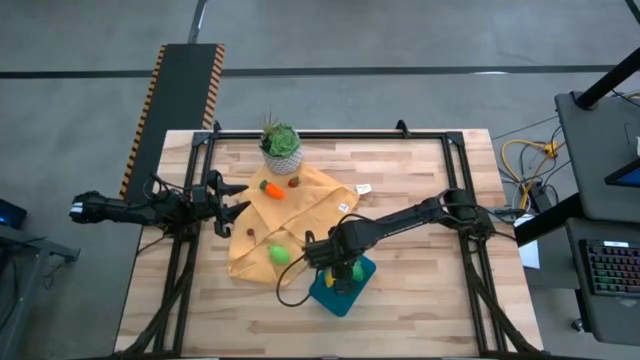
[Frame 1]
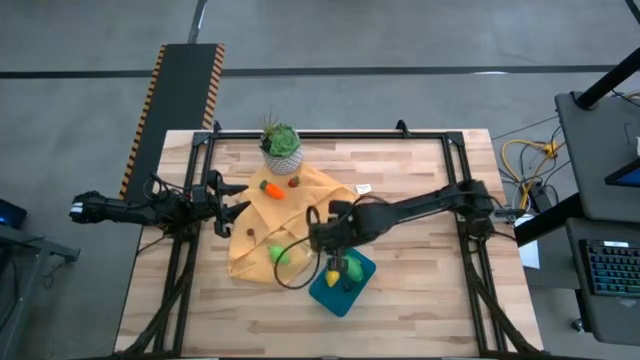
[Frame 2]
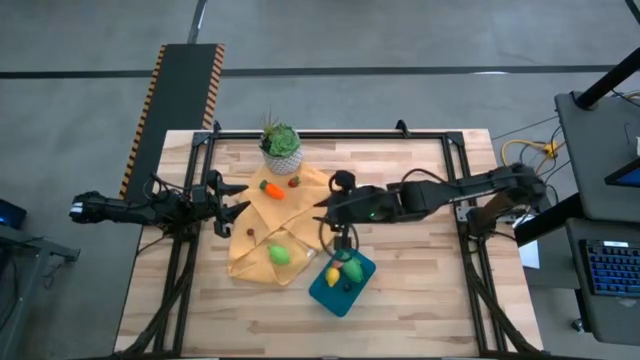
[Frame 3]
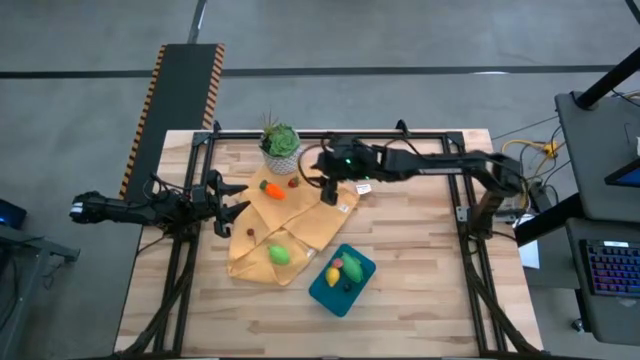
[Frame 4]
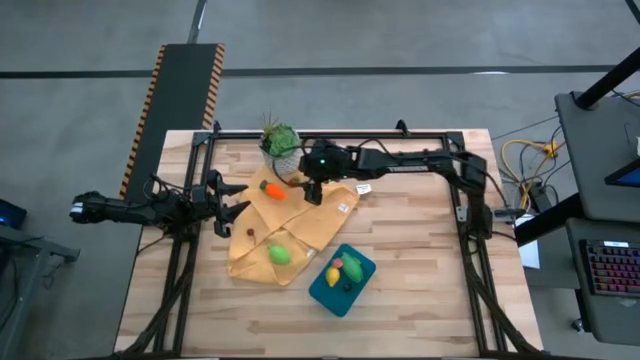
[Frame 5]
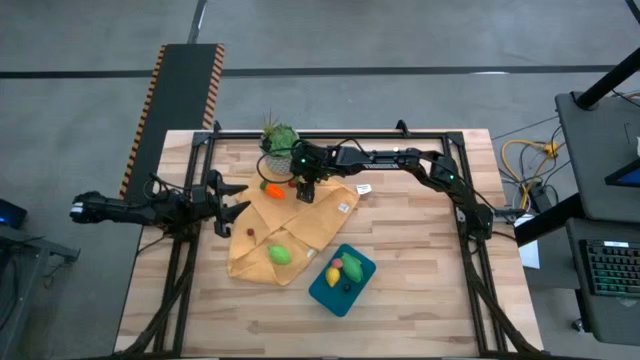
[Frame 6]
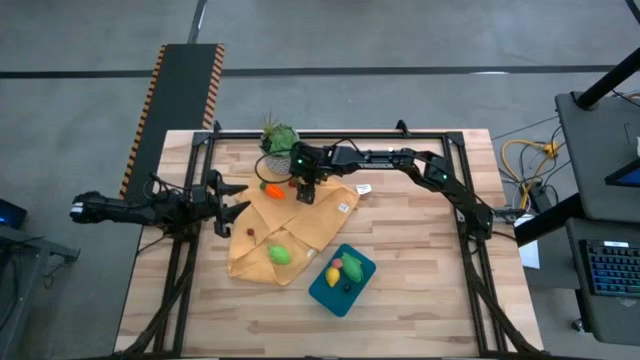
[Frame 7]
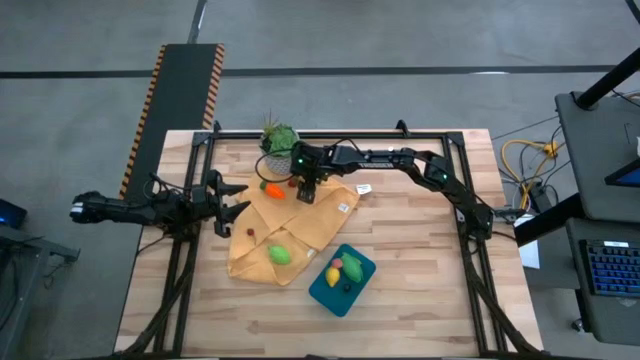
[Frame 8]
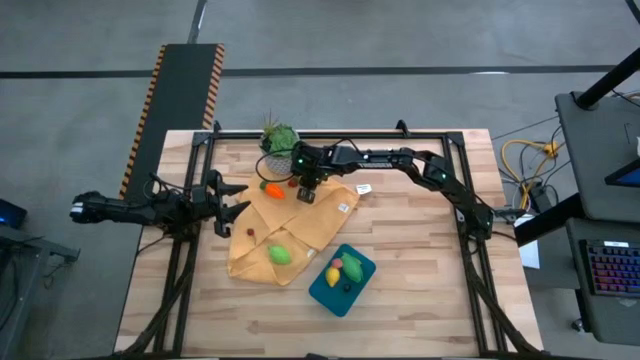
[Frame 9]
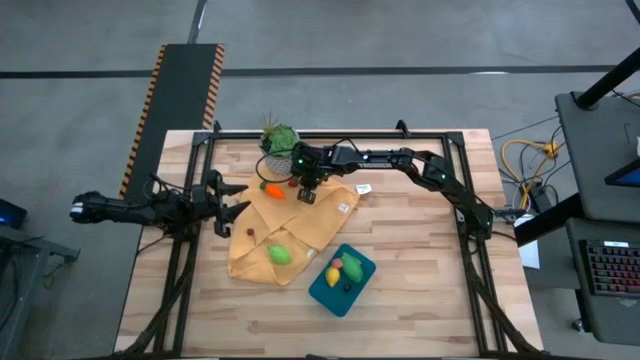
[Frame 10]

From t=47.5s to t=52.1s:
Task: Pick and placing Produce into tupperware
Put the red strawberry into the blue bin

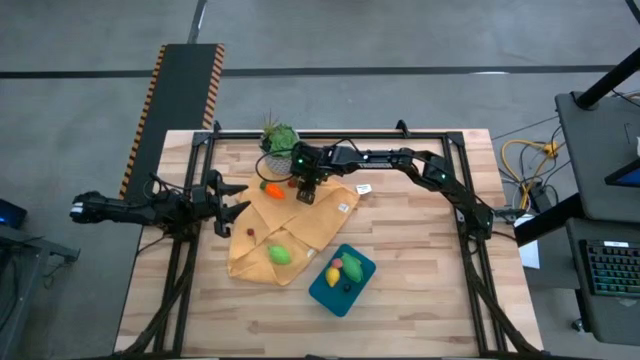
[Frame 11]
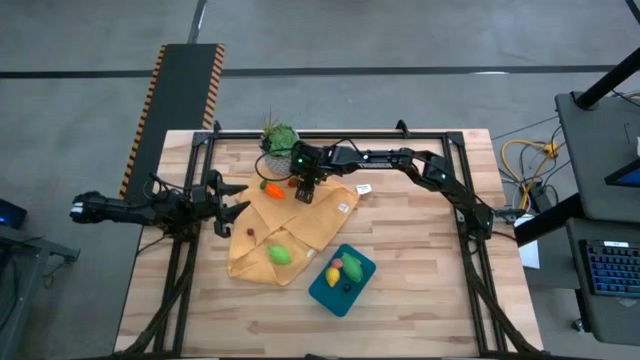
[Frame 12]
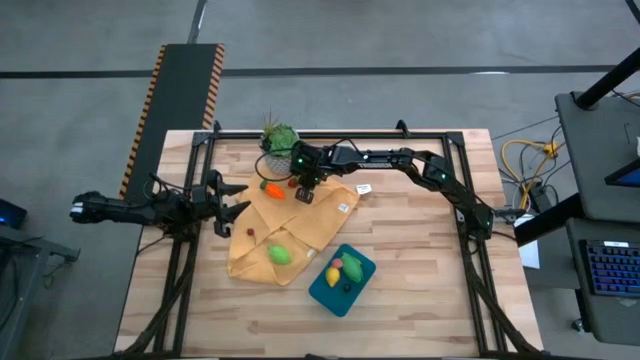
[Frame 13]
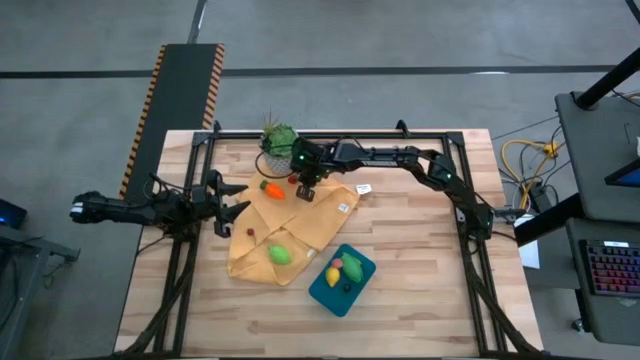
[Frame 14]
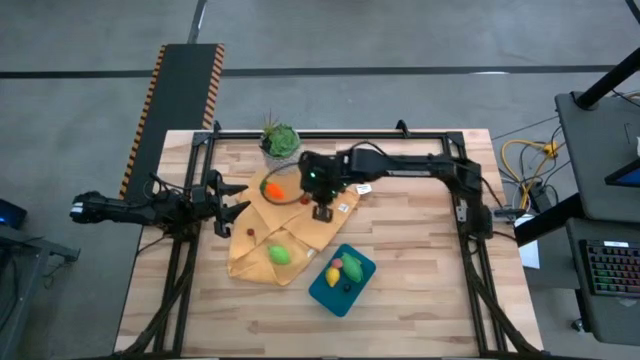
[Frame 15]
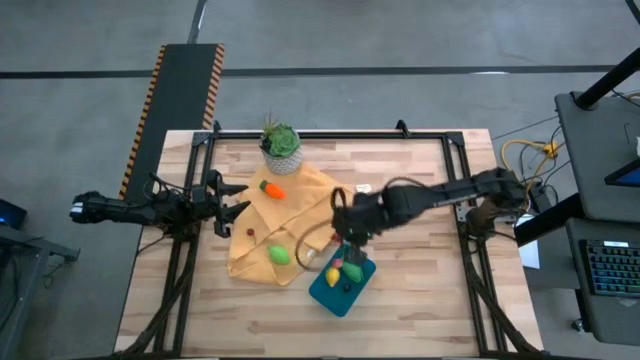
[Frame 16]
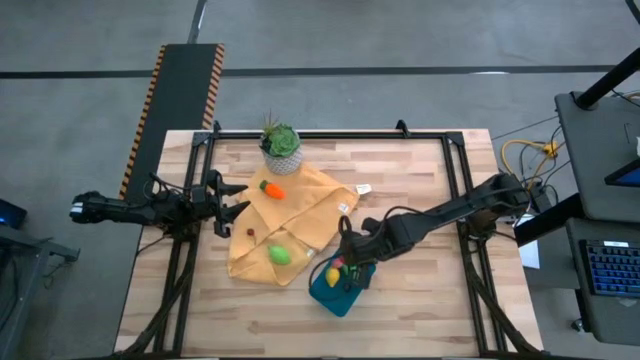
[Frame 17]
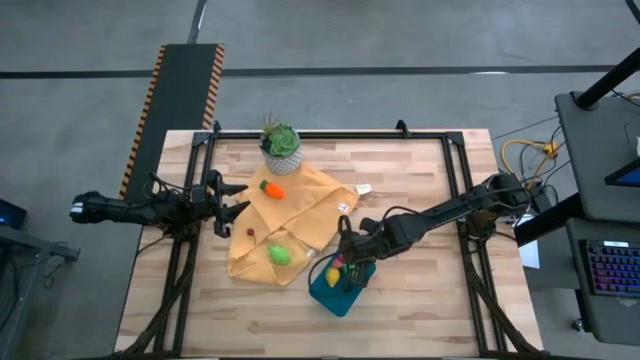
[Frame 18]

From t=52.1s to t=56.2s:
Put the red strawberry into the blue bin

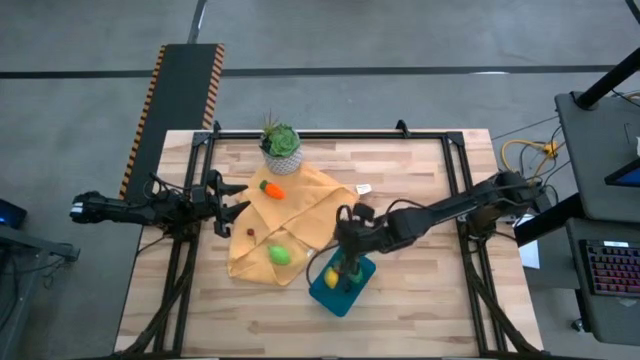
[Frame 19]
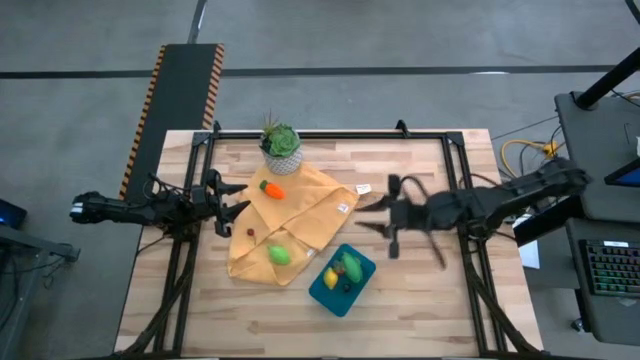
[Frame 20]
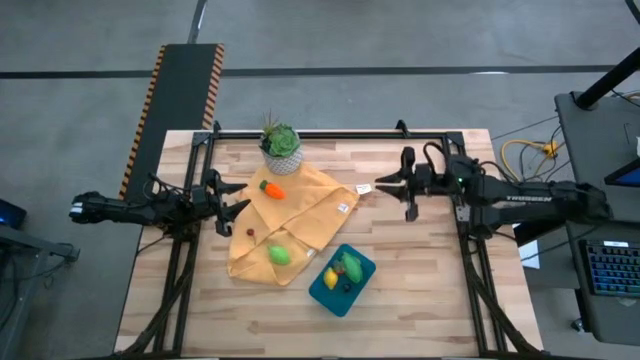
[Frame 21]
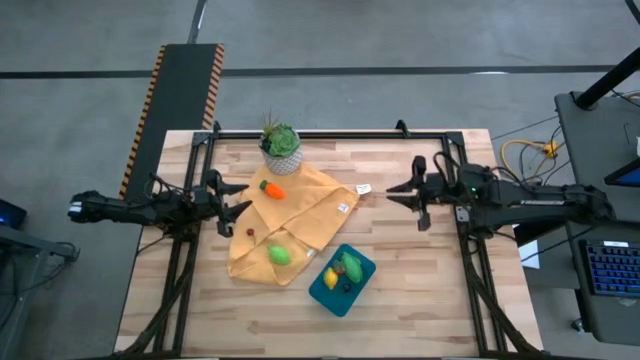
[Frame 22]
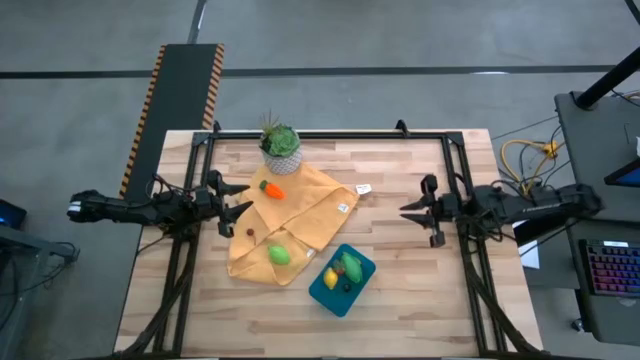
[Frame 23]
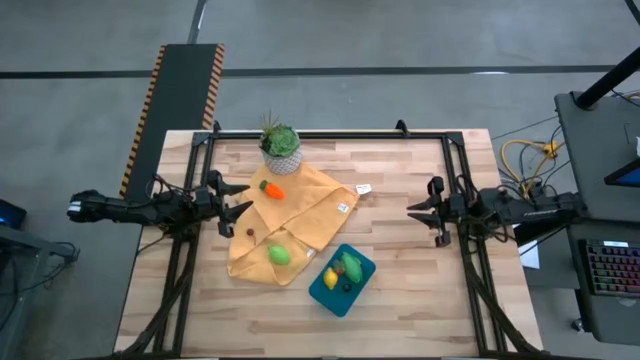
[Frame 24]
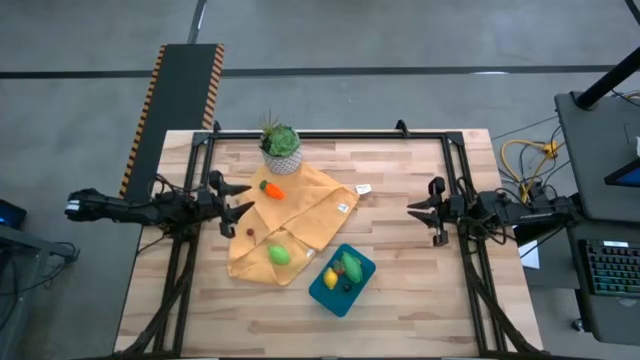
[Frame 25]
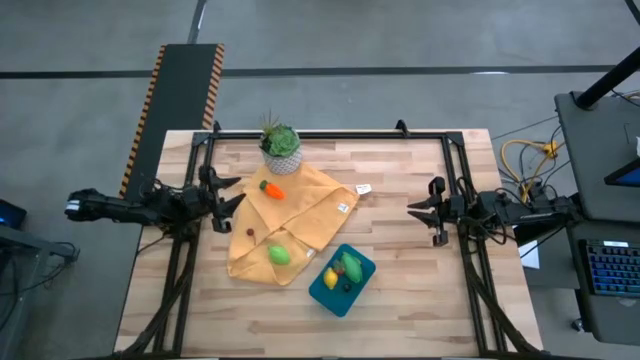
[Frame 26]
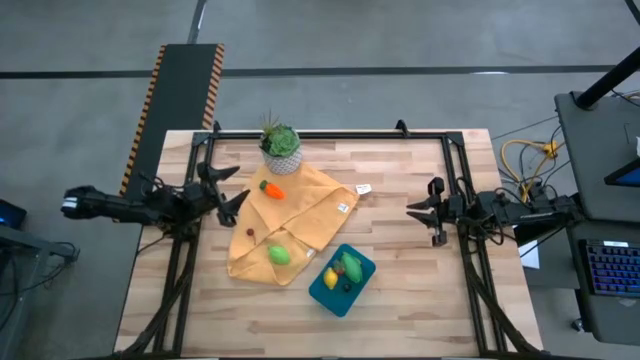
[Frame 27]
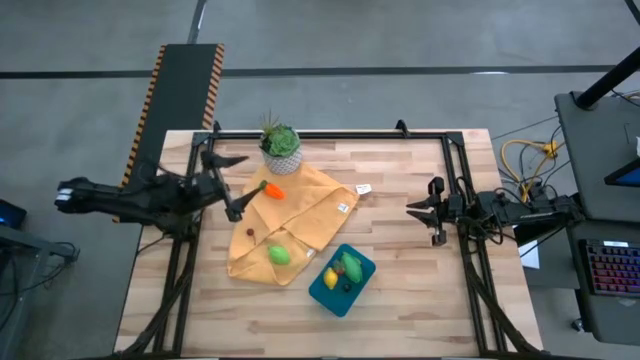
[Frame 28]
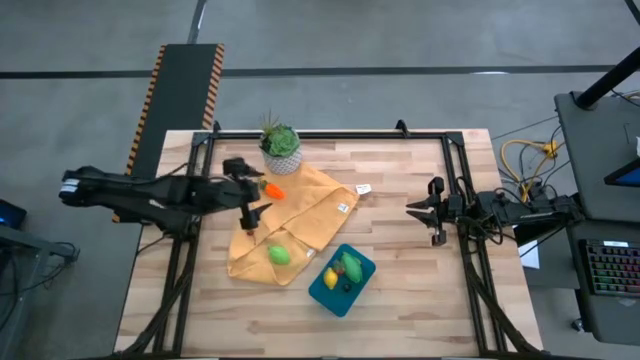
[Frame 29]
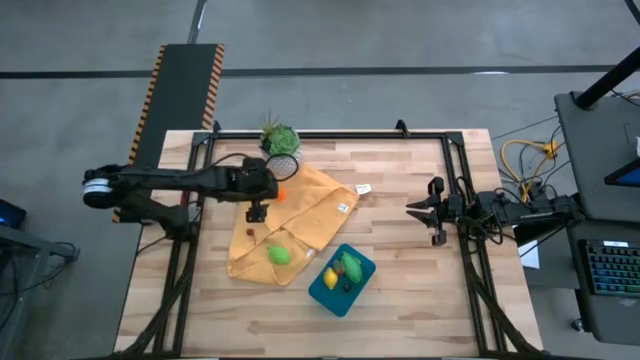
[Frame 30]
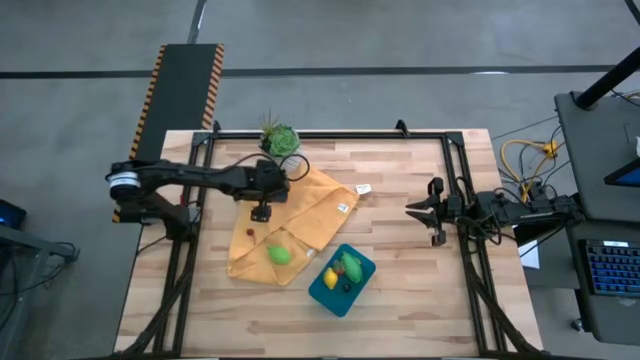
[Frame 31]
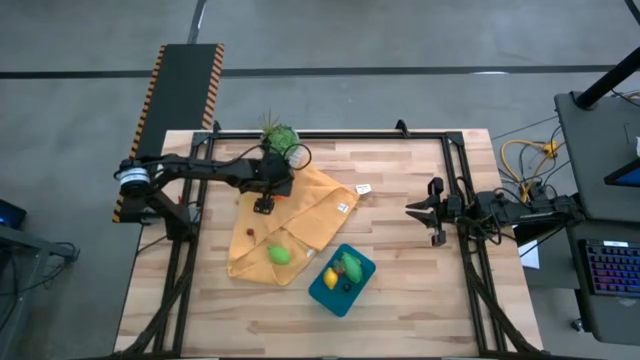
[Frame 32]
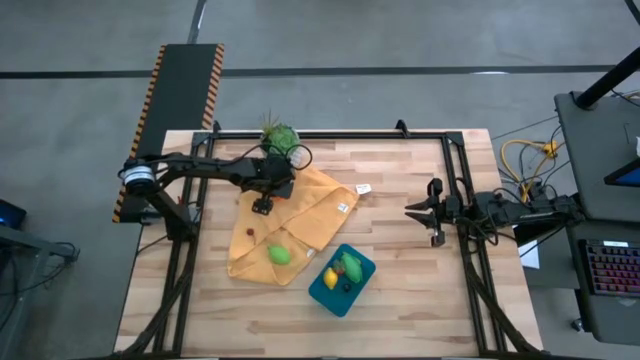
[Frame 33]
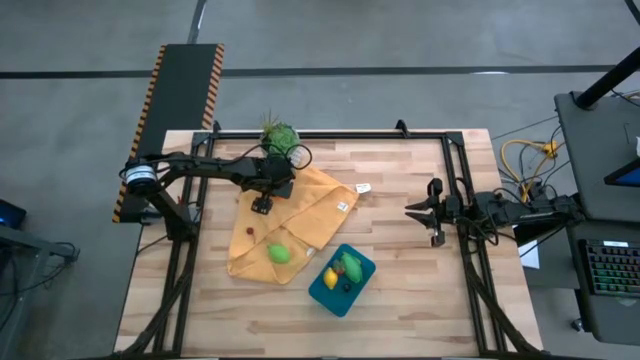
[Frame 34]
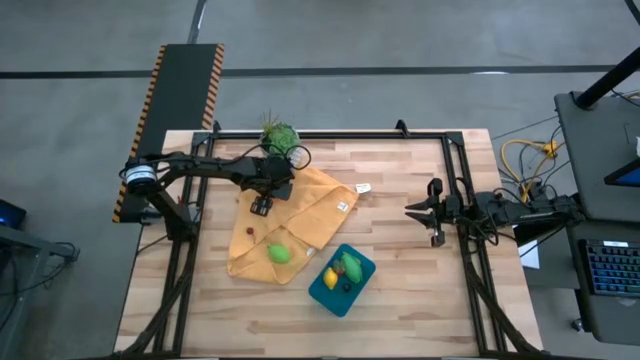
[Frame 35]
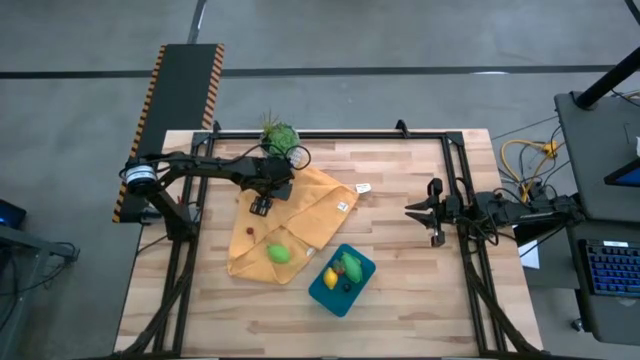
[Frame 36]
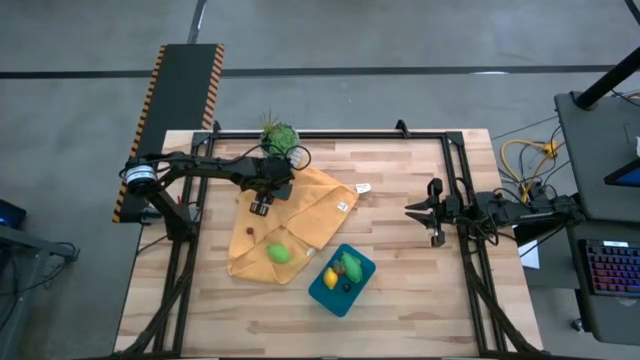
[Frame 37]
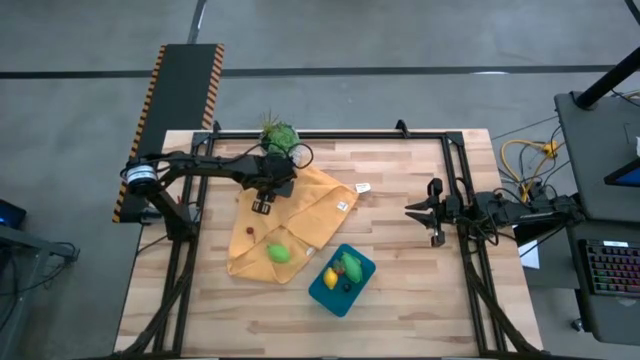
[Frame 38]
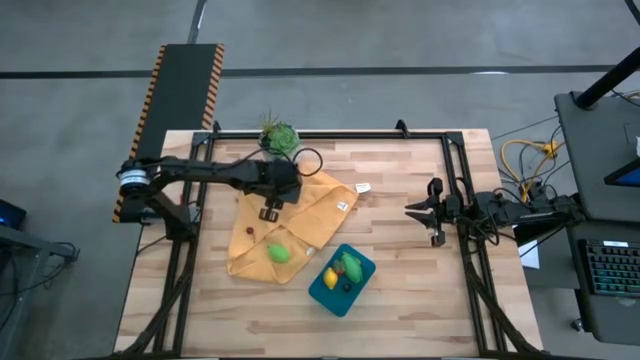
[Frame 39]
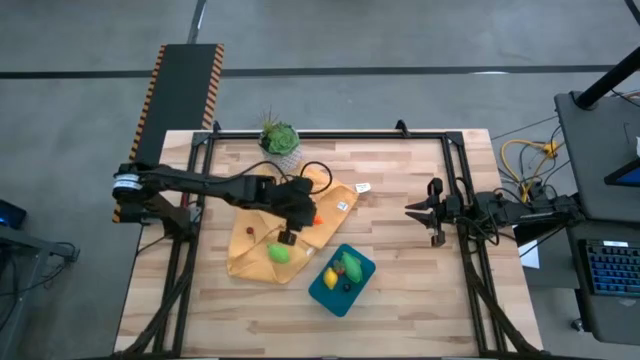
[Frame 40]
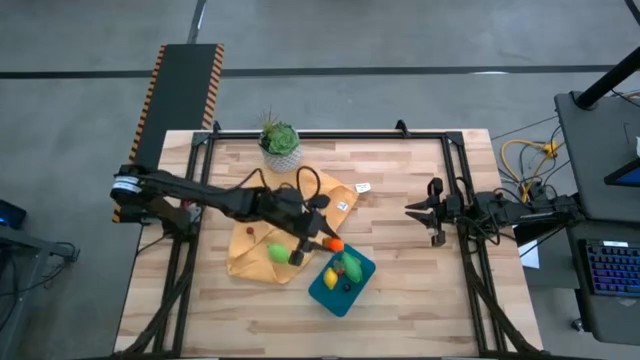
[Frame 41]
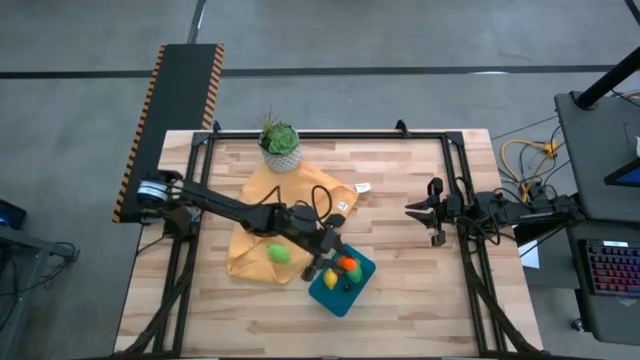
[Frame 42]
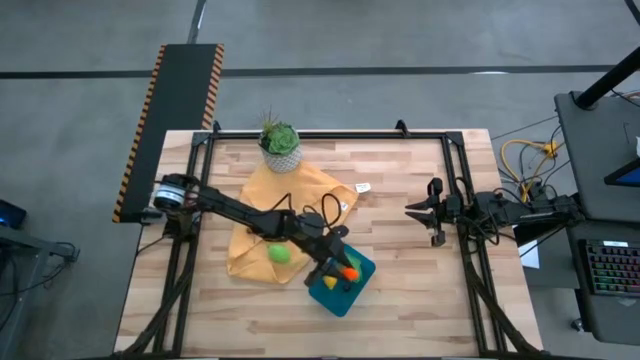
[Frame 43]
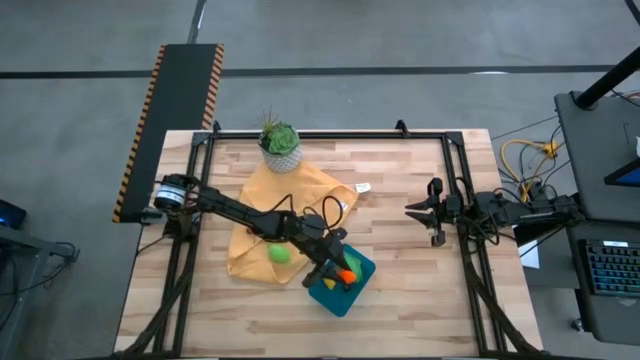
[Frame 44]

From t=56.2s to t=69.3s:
Put the orange carrot into the blue bin
